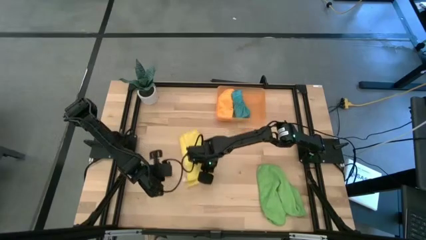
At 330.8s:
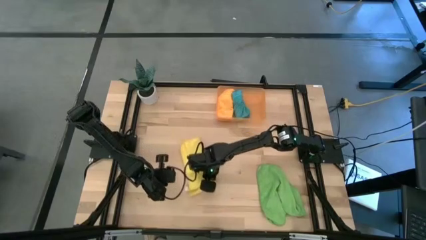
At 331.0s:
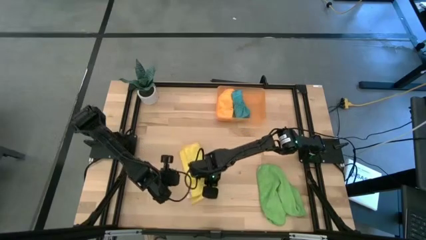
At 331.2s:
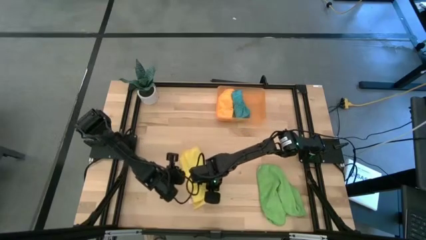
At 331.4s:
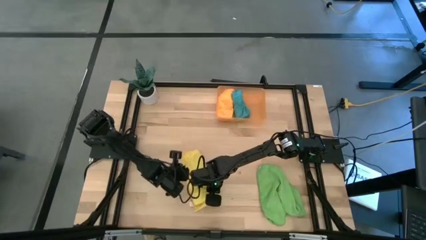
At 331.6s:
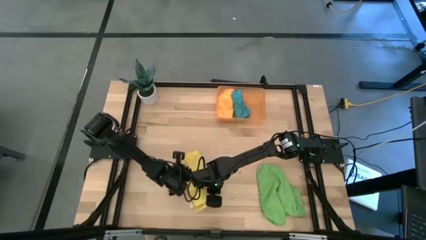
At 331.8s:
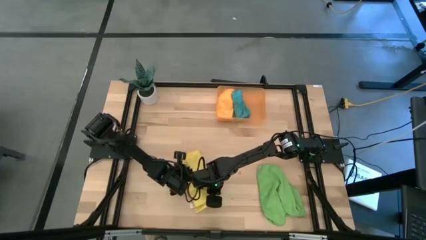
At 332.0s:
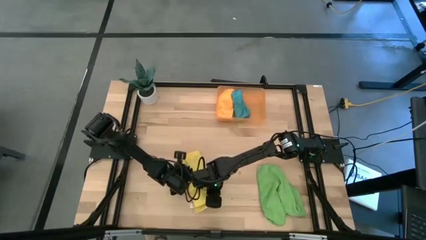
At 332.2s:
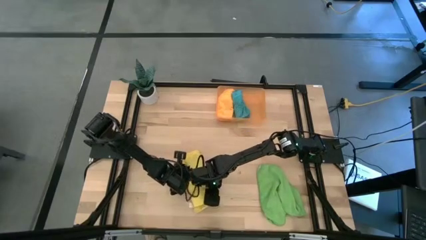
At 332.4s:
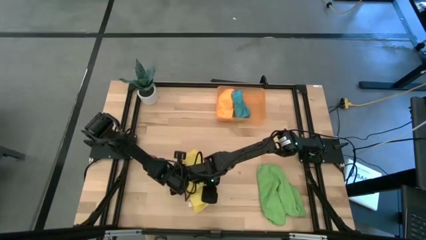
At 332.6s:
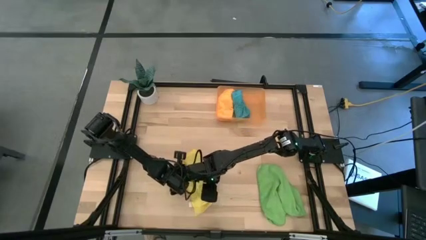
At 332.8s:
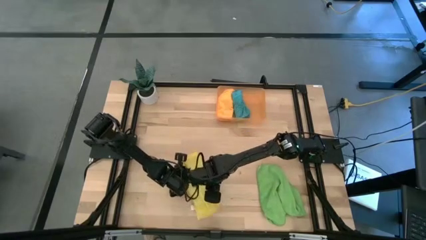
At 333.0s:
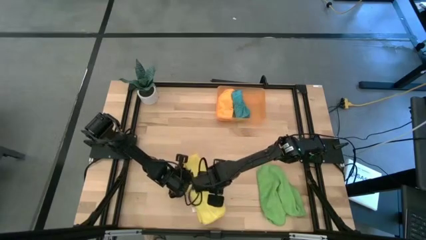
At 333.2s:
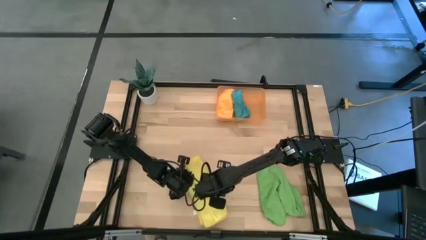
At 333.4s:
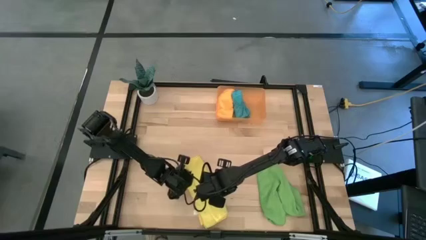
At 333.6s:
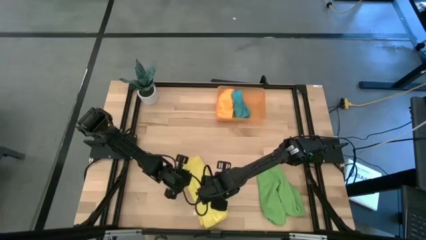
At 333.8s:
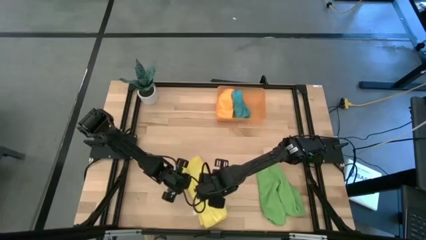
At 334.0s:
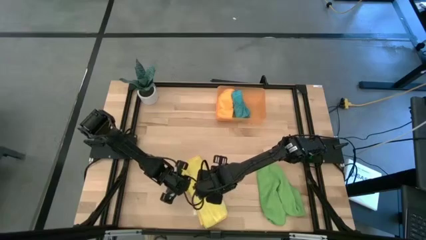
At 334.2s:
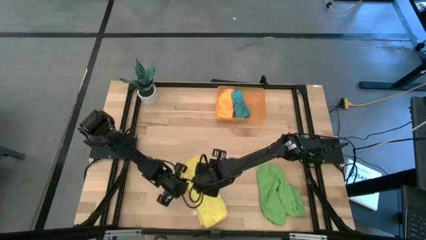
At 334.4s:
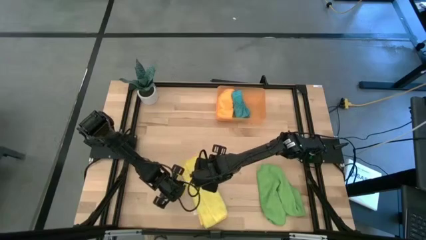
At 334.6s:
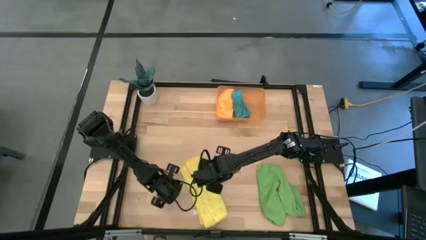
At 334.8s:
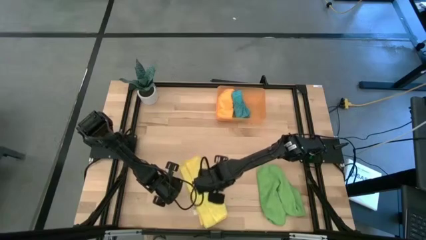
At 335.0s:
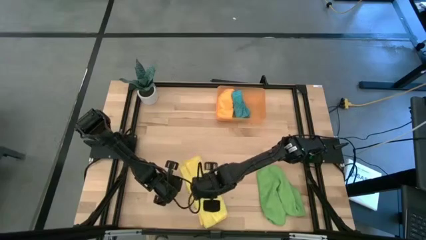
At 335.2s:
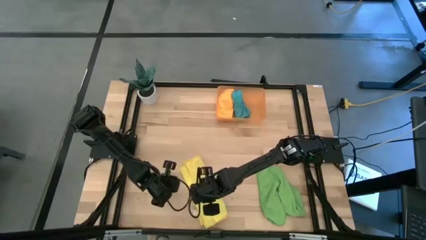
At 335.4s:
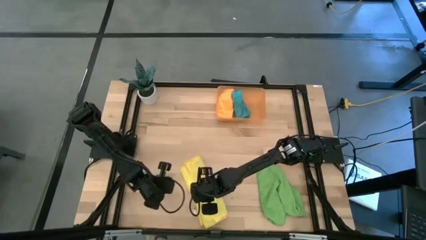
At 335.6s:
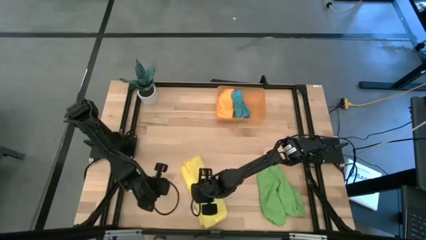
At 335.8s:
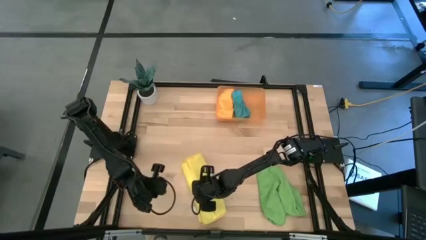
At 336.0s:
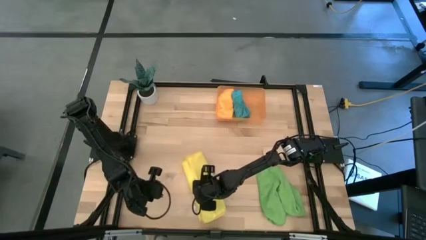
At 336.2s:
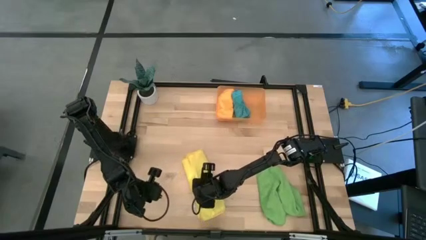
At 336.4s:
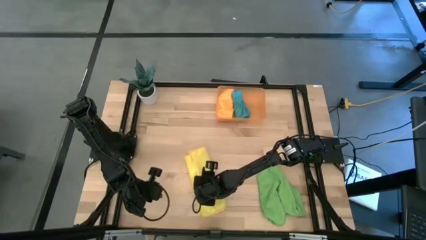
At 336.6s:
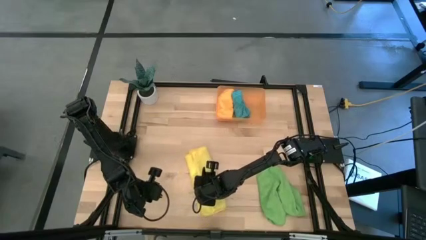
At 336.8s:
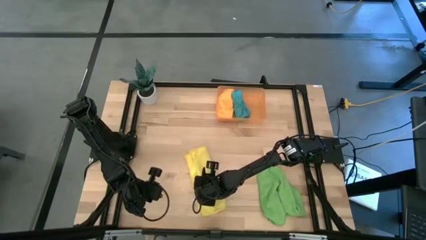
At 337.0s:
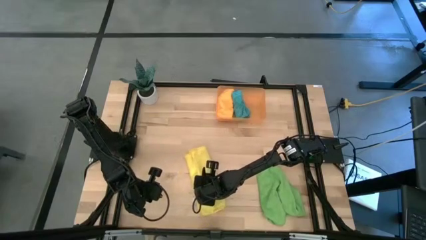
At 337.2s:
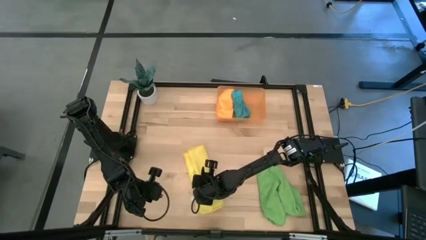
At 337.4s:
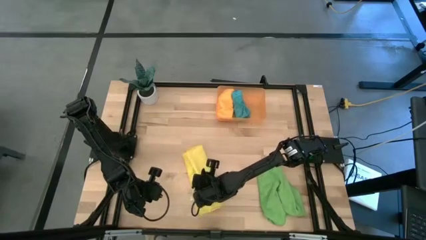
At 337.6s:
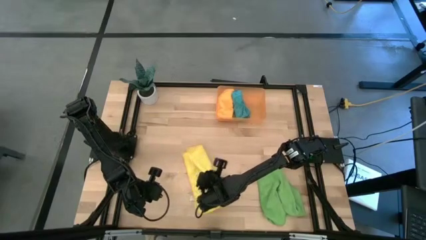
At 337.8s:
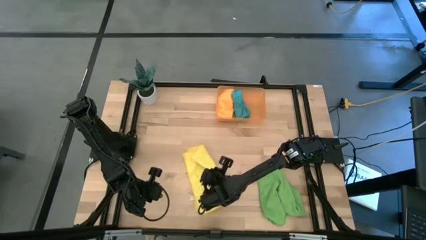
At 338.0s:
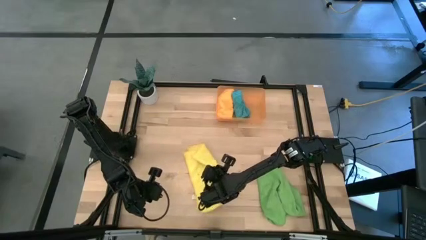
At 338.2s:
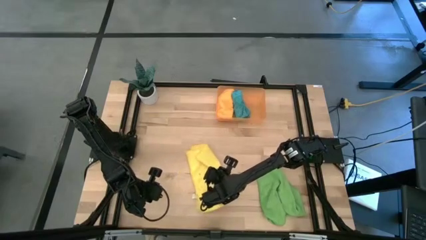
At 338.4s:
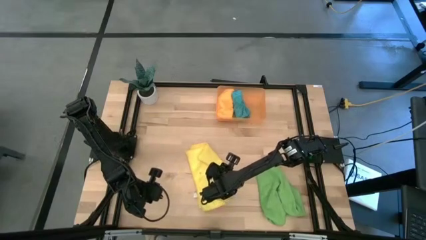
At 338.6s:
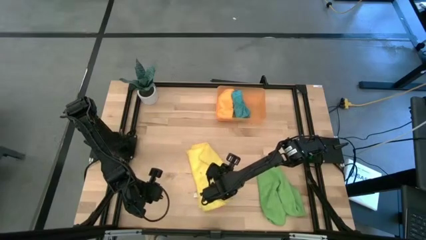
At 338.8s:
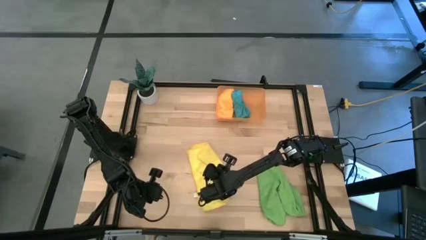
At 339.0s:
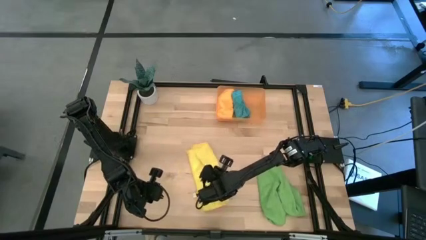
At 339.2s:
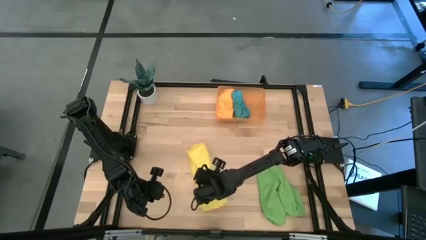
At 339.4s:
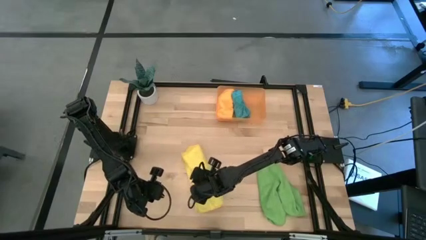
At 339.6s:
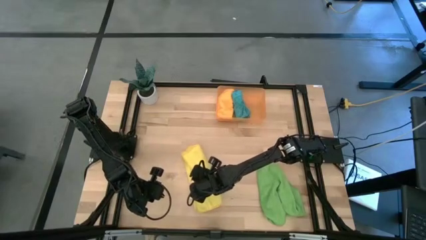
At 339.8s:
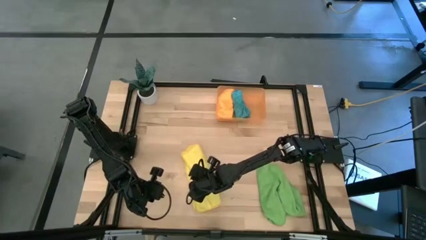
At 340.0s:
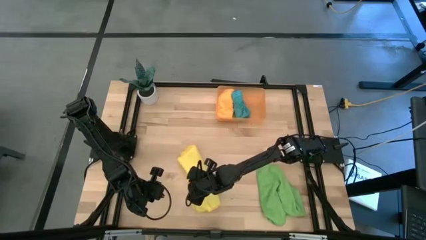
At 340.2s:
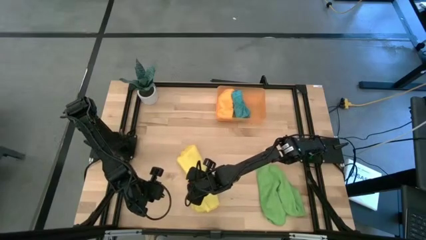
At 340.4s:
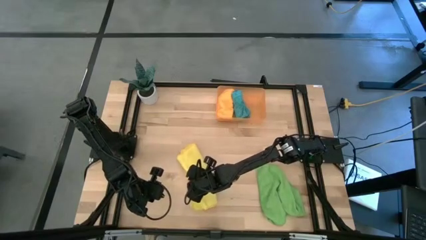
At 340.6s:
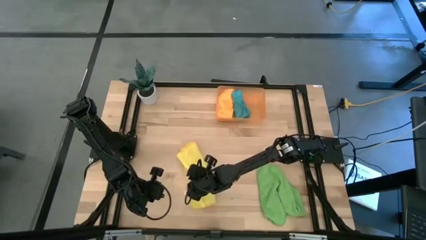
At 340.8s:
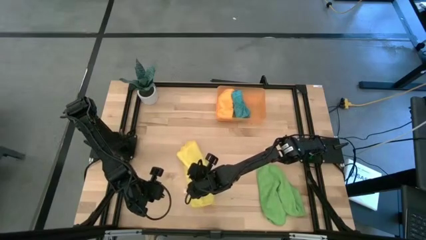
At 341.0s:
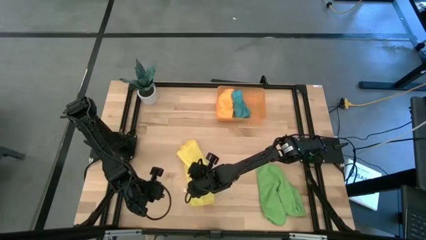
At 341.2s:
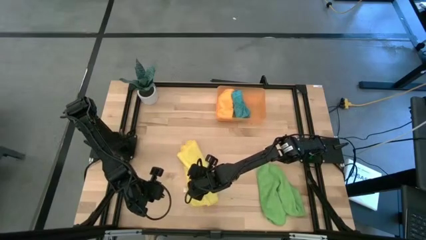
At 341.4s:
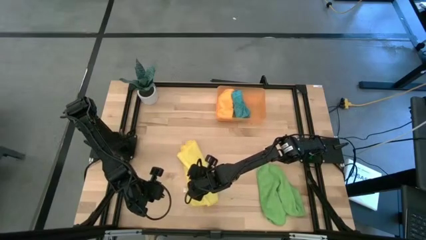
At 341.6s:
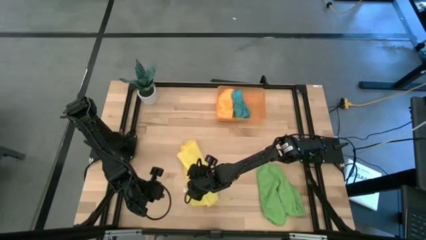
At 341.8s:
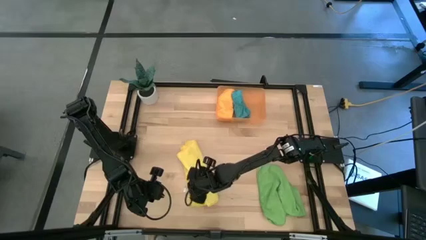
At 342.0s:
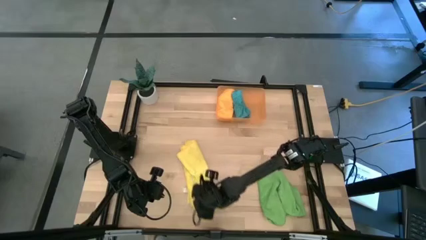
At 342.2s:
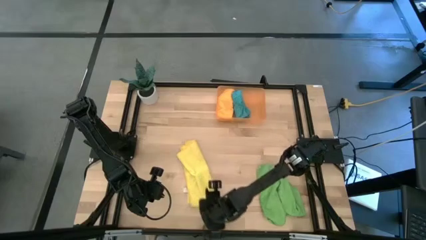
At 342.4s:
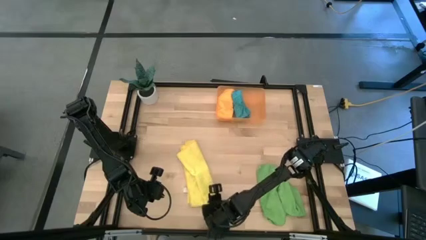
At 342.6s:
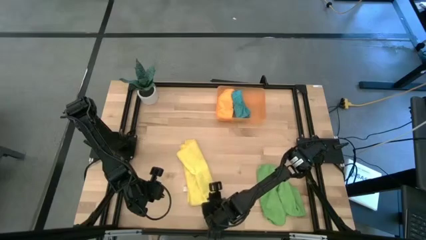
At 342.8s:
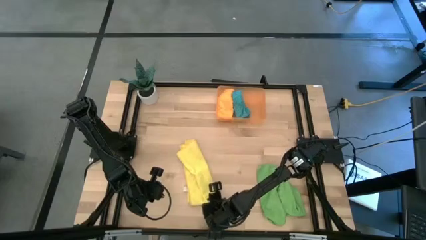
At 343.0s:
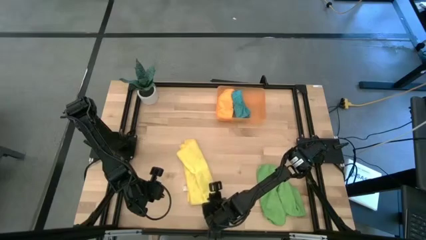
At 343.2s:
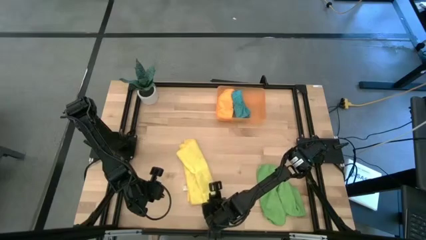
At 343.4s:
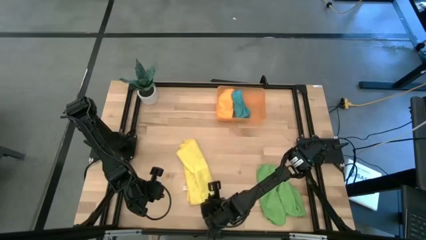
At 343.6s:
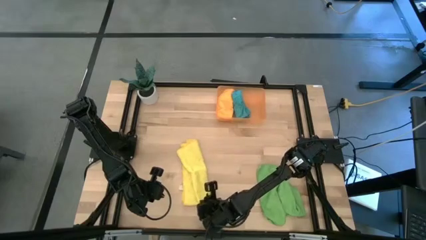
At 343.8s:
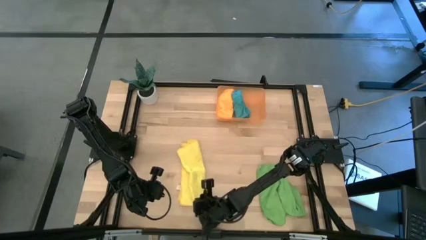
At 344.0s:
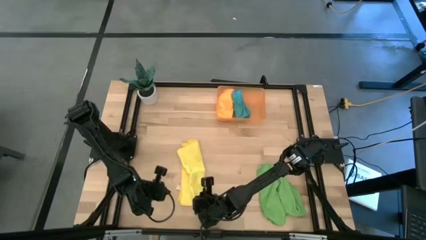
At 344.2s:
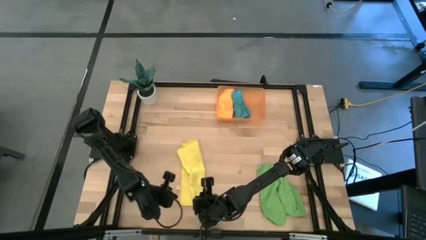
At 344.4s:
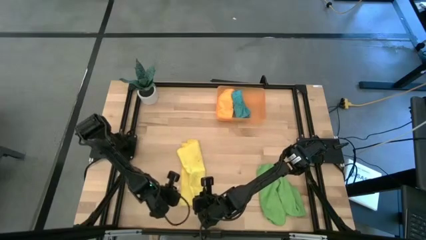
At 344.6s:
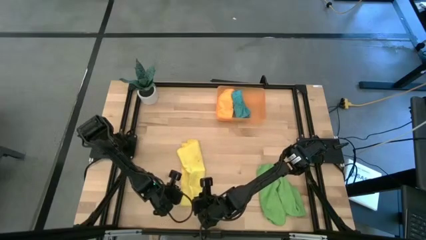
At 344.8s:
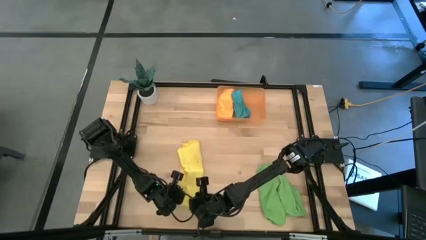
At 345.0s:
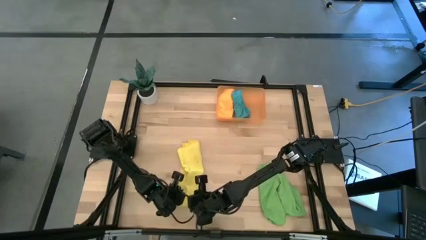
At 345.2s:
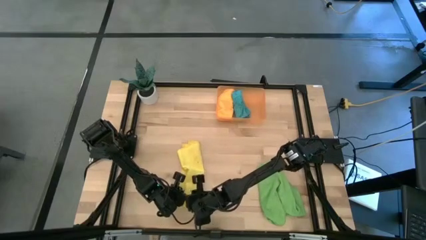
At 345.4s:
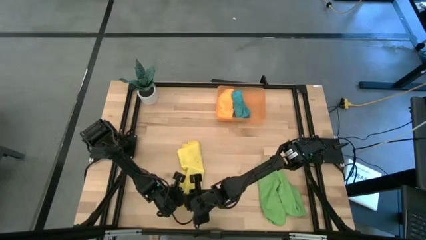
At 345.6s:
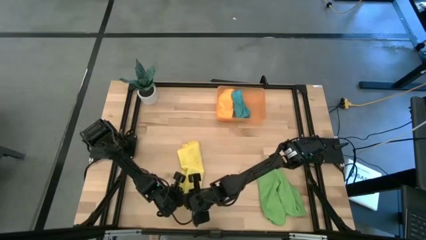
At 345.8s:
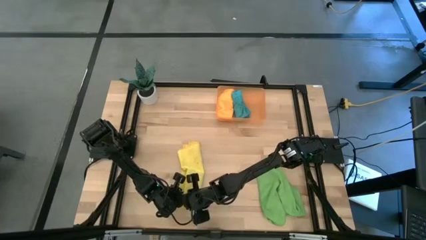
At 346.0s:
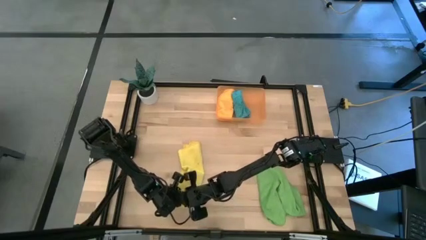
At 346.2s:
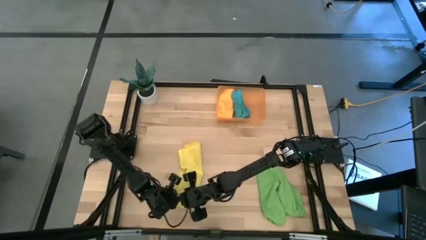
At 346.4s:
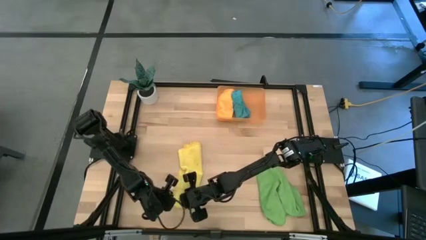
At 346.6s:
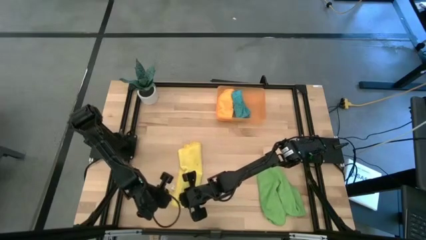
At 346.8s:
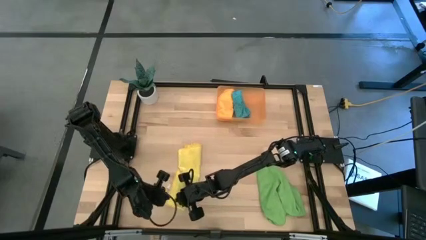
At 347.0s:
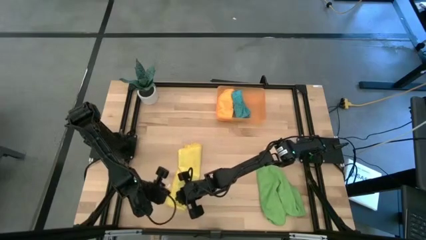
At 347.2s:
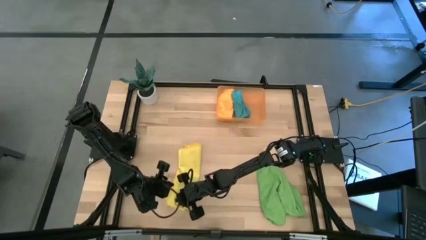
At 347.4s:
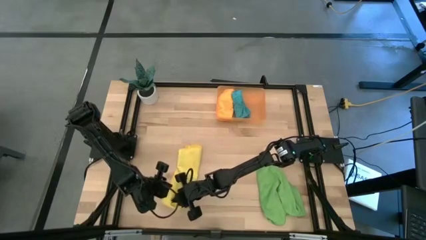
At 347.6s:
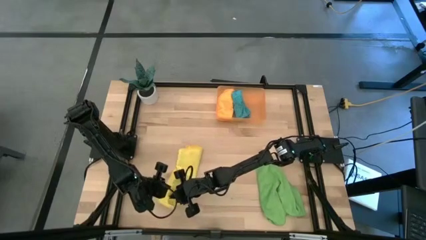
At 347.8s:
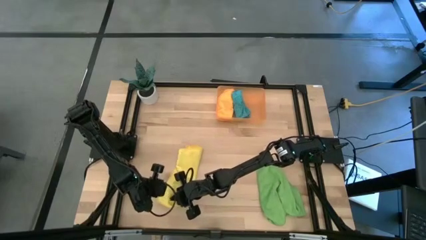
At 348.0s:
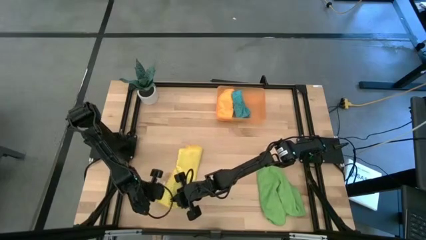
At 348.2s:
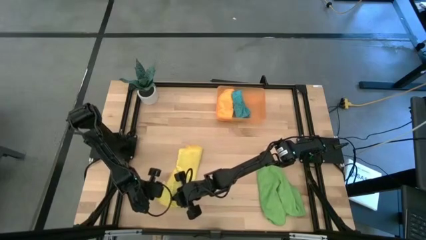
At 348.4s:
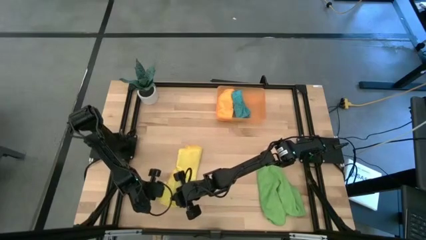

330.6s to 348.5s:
Task: Roll microfiber towels into tight, uniform cylinder then place into a basket
Roll the yellow microfiber towel
